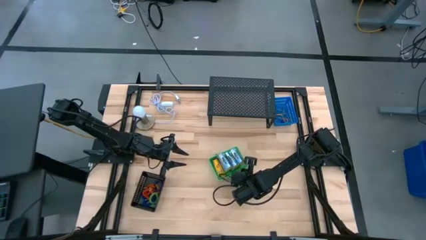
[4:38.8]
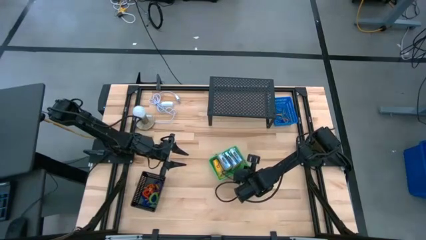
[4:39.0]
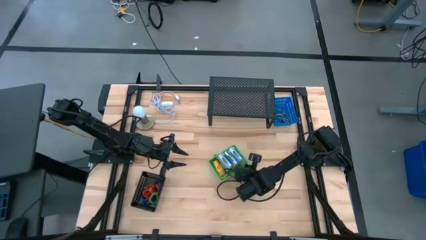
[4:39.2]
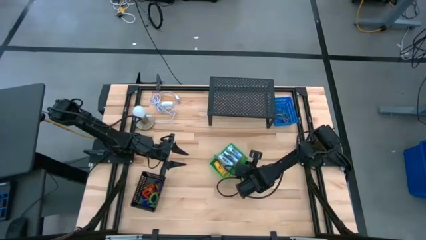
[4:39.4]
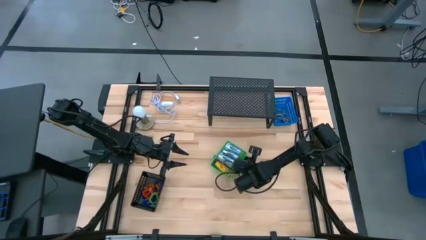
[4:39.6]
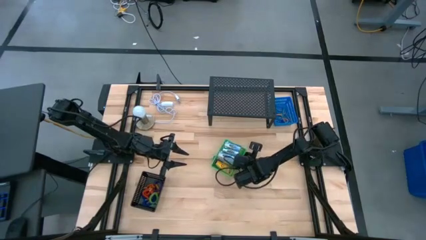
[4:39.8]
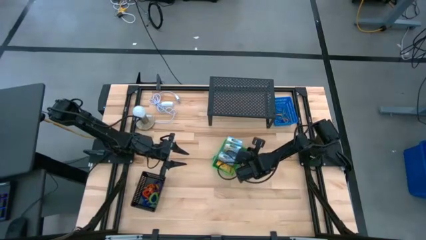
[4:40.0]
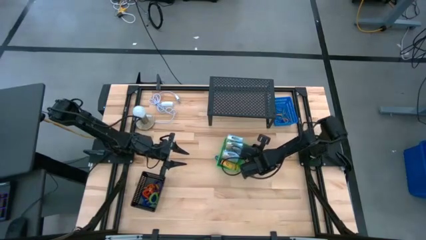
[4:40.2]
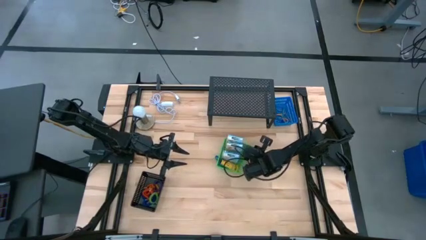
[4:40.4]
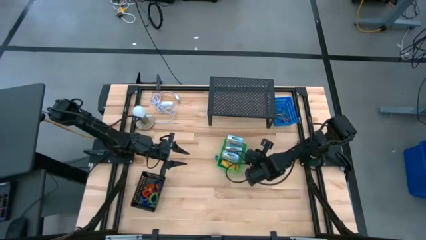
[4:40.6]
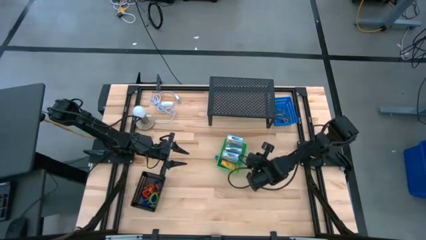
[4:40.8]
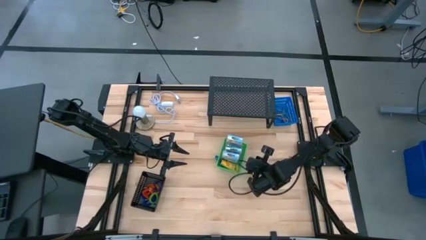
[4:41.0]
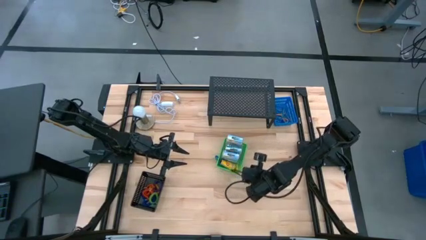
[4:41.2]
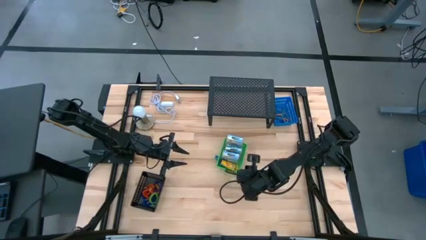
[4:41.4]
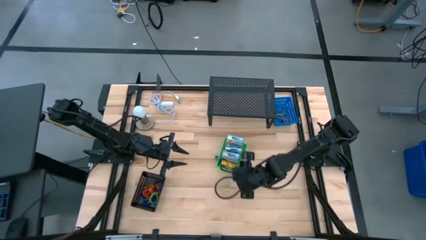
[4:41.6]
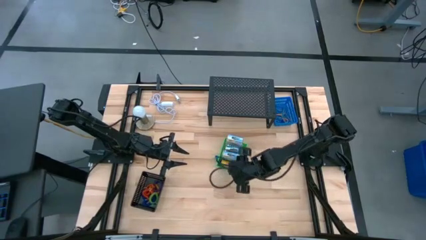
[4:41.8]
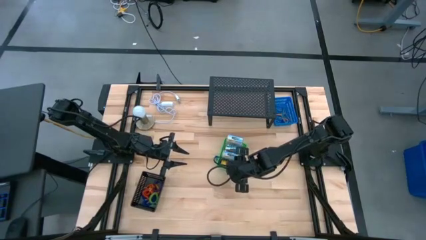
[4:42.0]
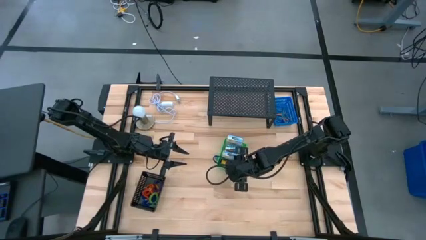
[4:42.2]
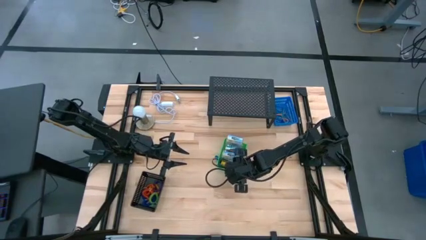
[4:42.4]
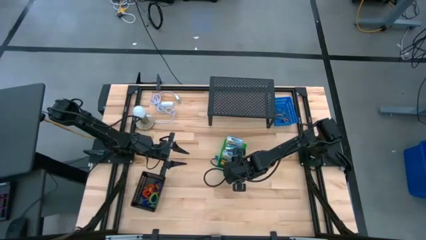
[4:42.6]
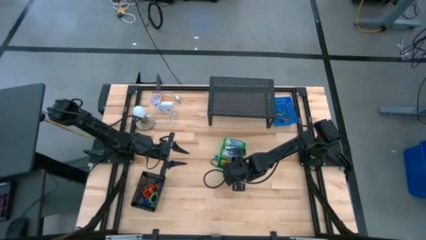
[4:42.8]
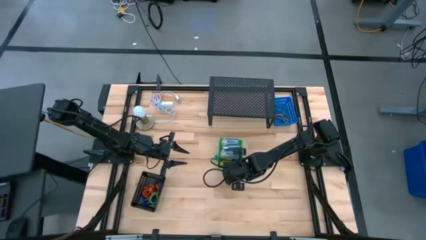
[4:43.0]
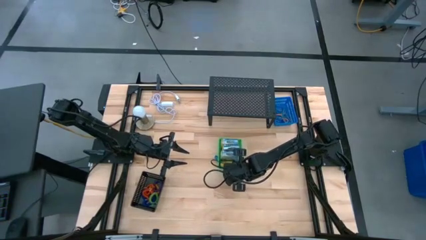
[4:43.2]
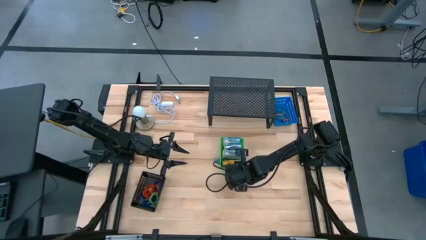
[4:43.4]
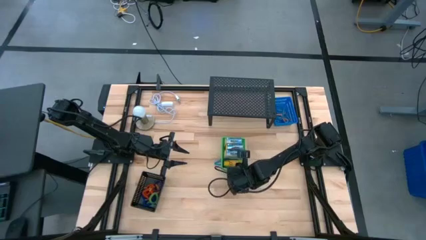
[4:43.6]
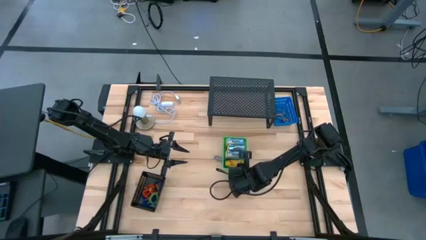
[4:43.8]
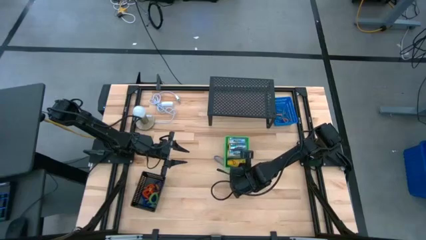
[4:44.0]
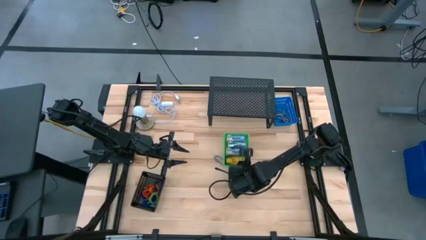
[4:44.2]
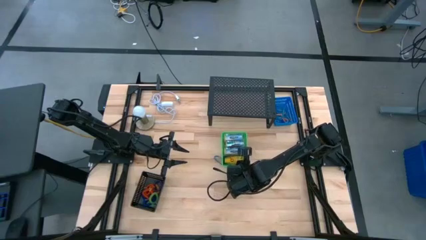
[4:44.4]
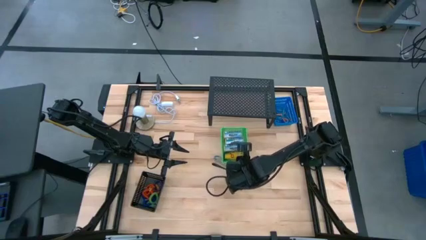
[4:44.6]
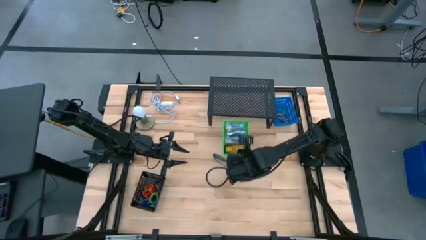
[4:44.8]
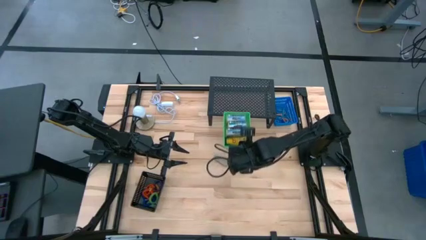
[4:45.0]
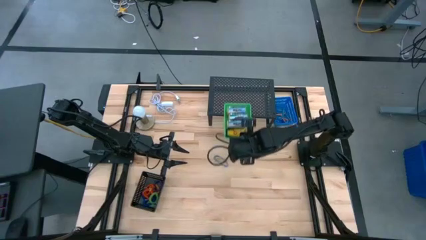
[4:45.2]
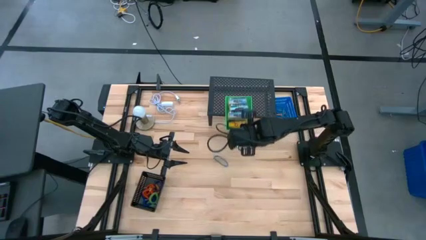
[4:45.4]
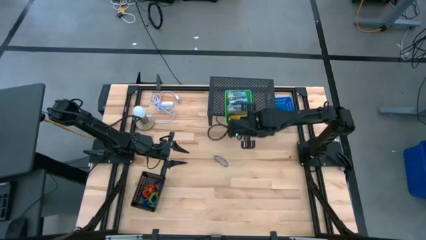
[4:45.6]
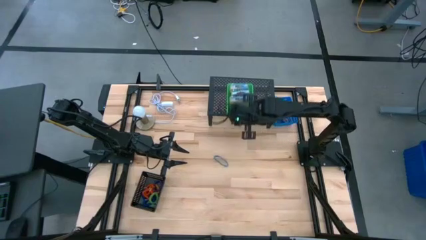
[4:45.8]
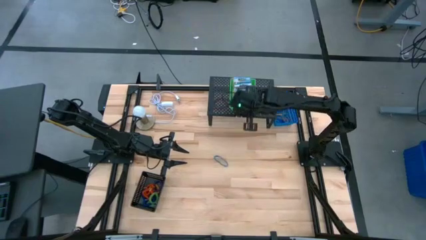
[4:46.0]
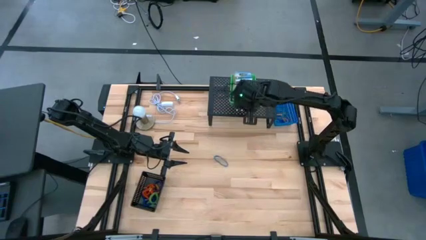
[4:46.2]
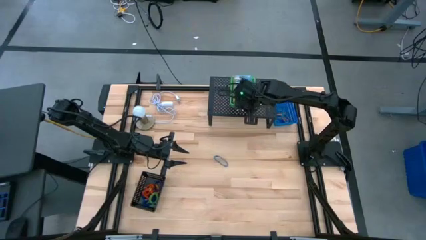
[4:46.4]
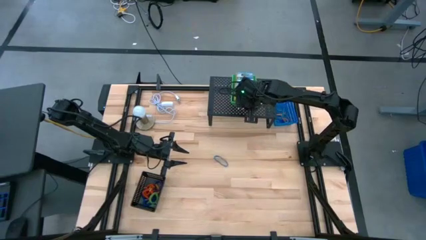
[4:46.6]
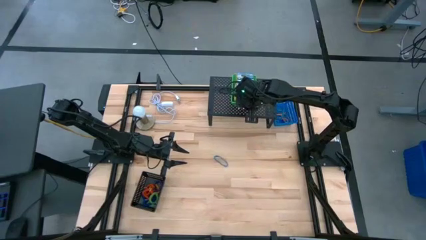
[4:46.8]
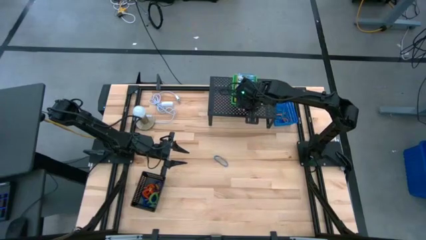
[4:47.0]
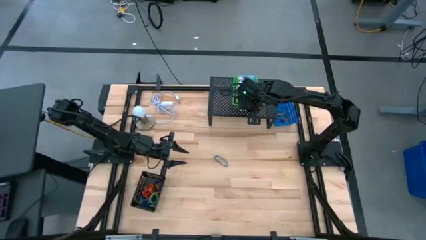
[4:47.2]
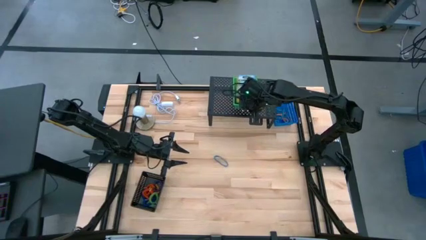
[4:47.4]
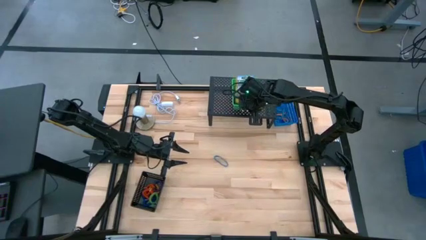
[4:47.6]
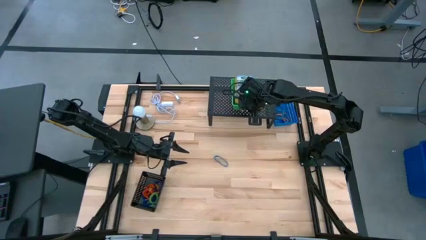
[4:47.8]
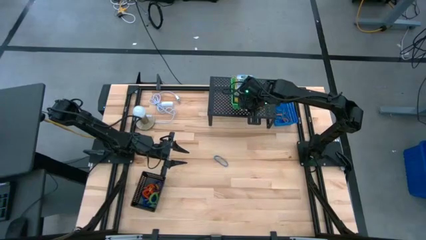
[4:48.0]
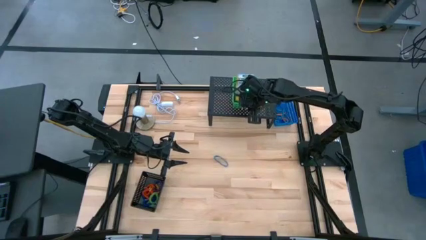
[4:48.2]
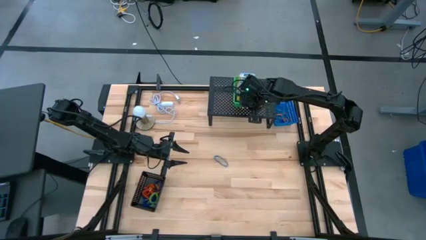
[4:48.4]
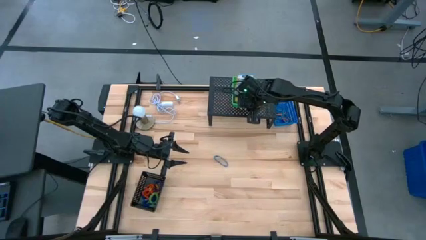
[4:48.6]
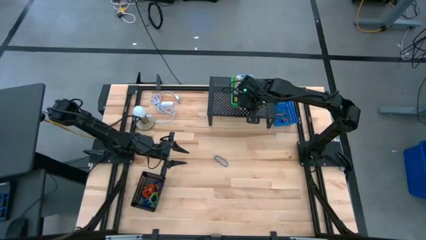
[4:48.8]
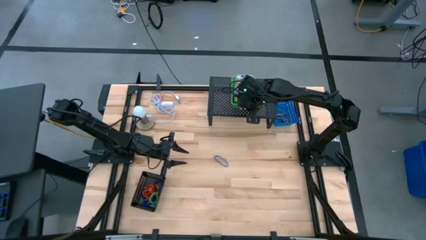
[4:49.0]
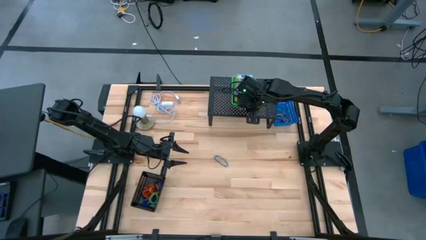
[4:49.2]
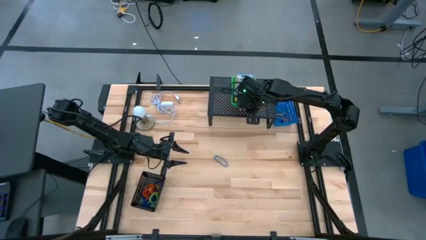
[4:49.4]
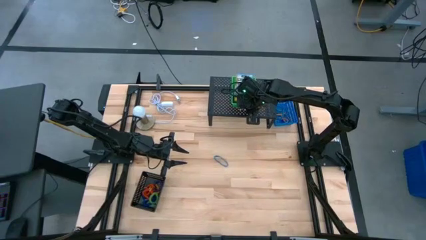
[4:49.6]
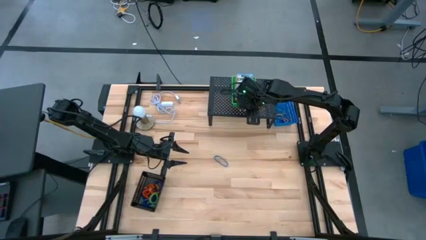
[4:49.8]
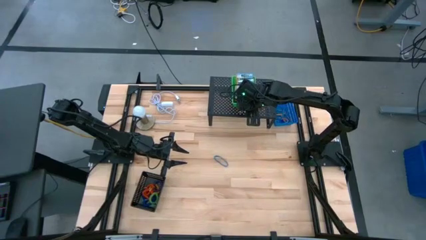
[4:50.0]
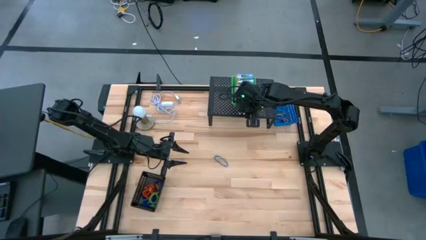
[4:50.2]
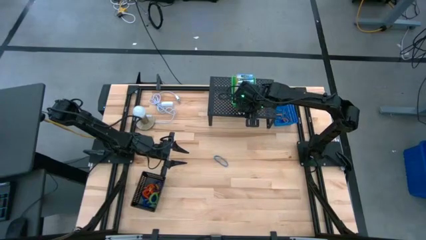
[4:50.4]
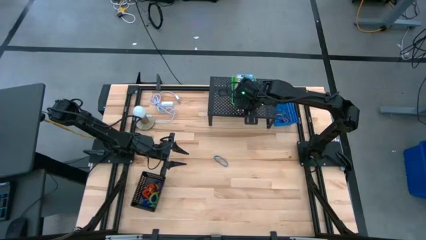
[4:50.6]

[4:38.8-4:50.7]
Task: Pick & Place Office Desk Supplies
Put the green bin on the shelf
